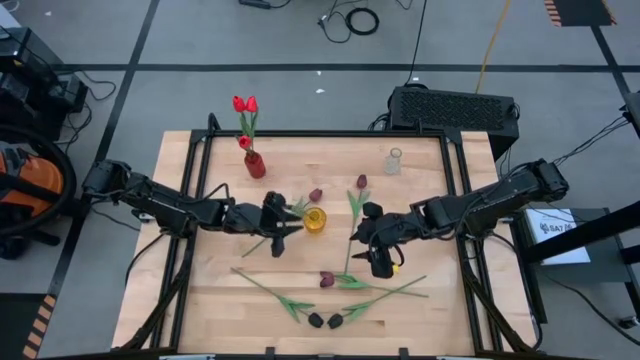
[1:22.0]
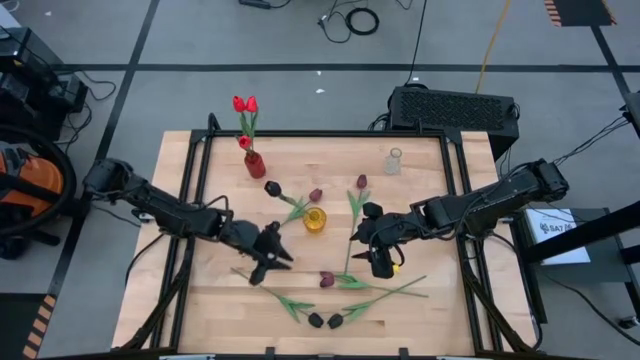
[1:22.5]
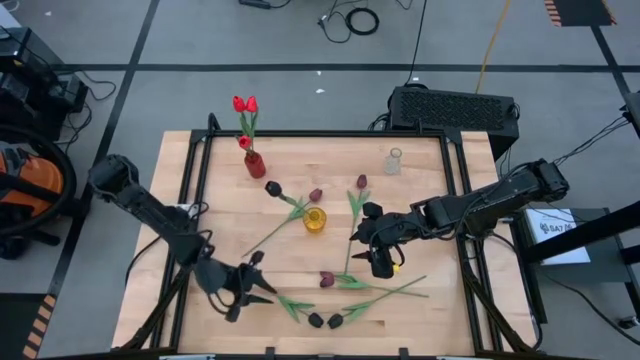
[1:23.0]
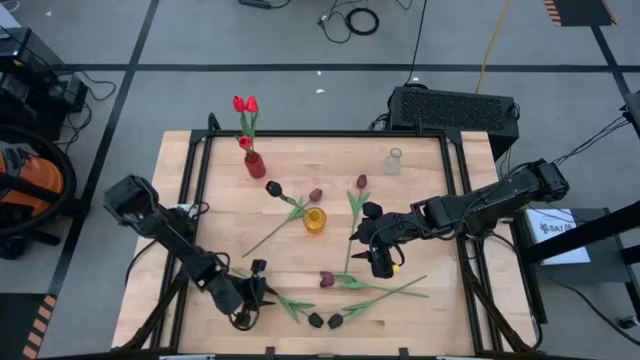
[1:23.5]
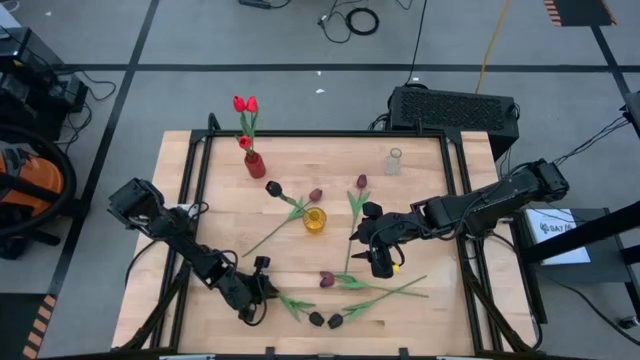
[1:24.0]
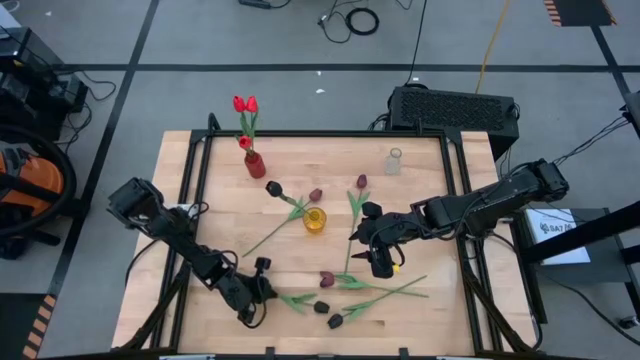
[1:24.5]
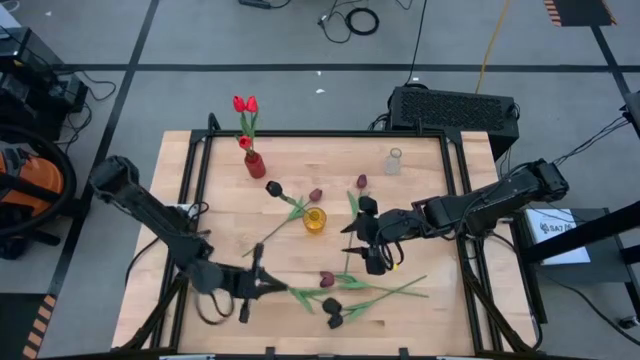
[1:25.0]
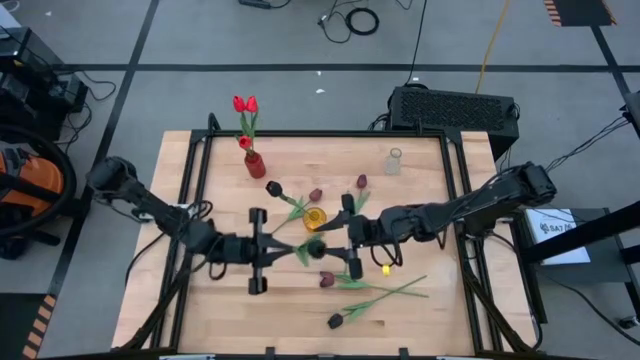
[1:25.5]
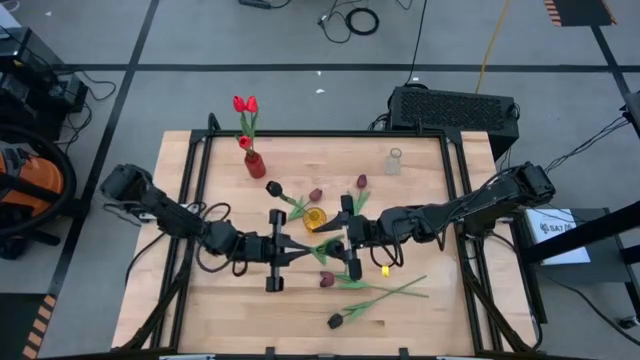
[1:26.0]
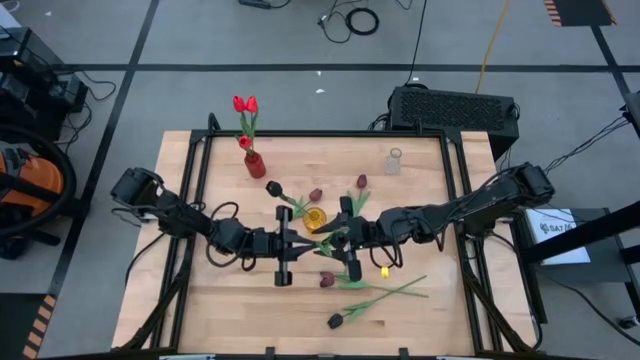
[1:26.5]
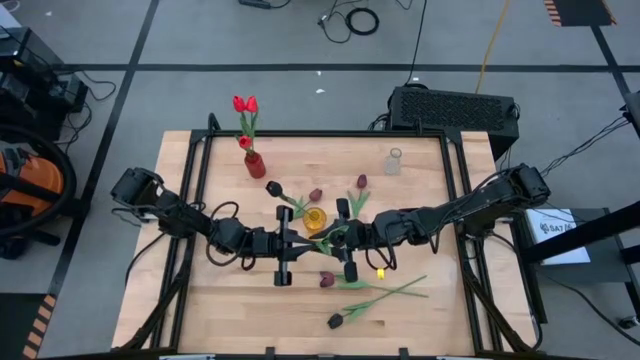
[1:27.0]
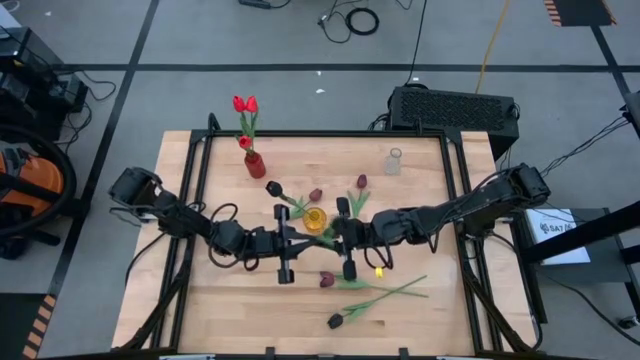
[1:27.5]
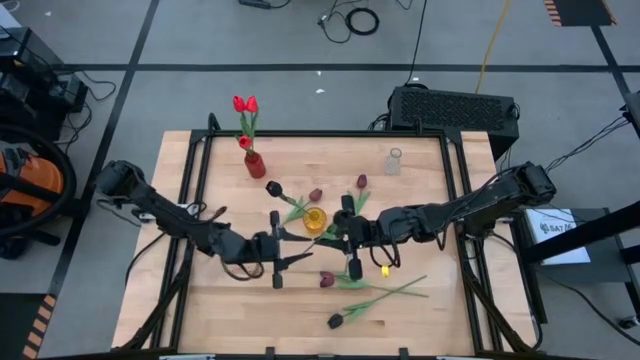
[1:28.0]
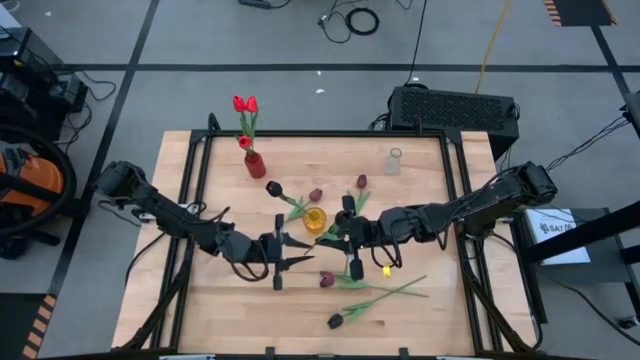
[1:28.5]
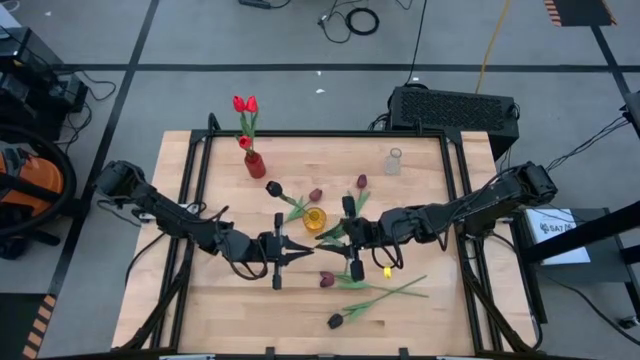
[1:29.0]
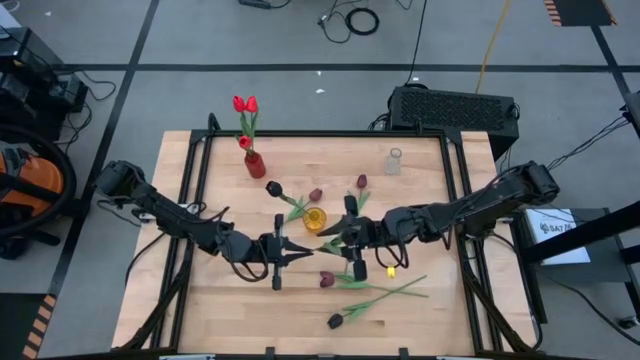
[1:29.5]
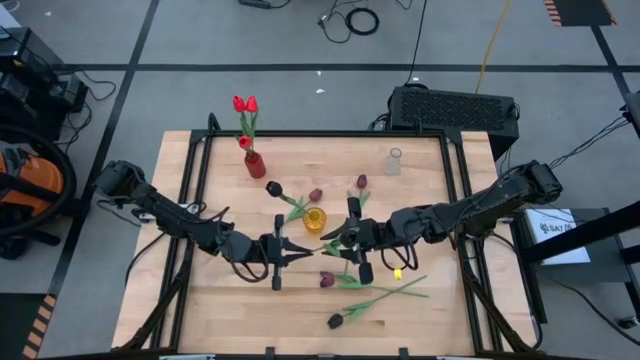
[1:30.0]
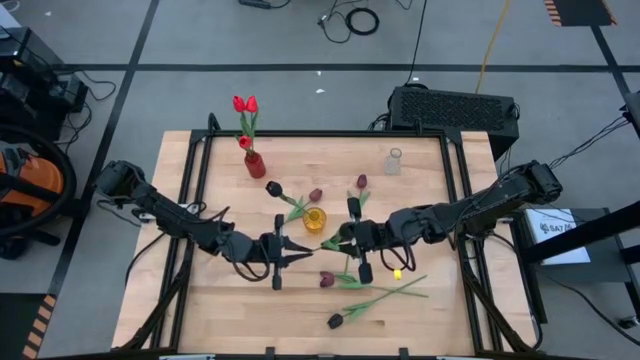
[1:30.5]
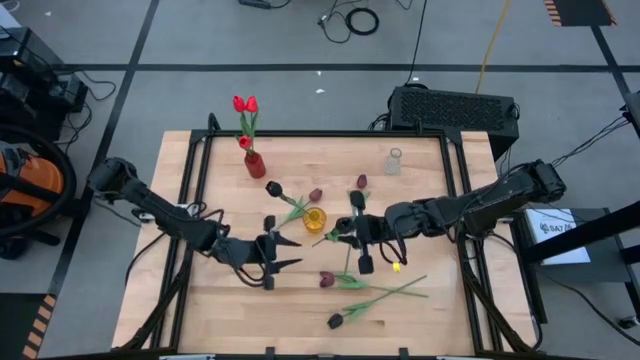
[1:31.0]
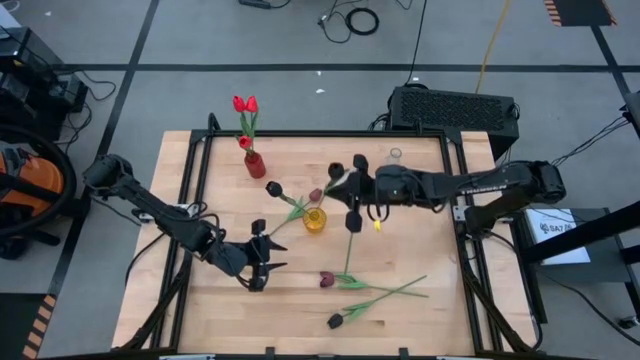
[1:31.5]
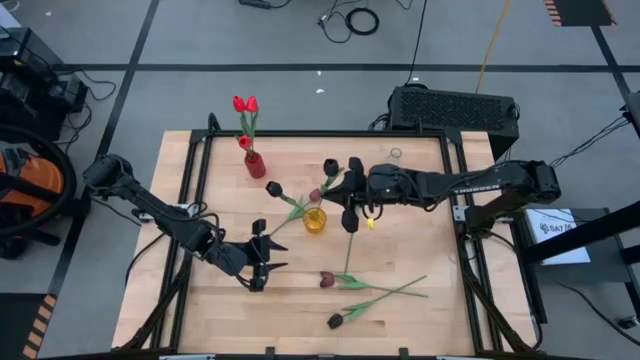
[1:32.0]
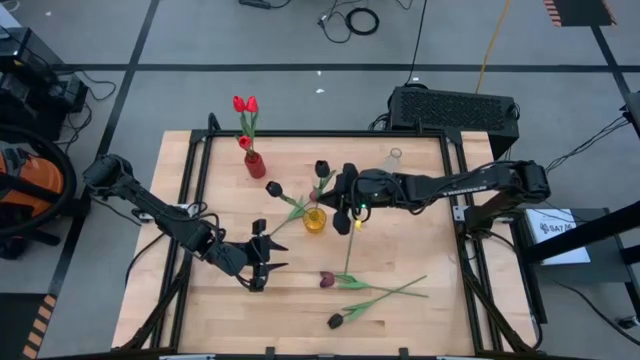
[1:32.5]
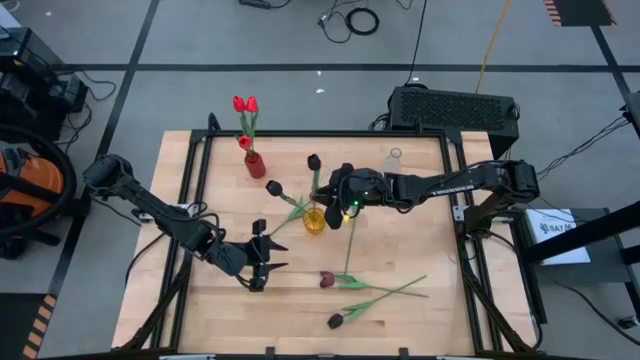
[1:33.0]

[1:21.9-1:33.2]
Task: Sort flowers into vase by color
Put the left black flower into the yellow vase

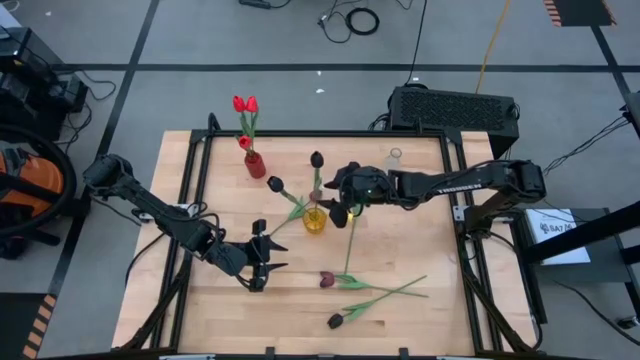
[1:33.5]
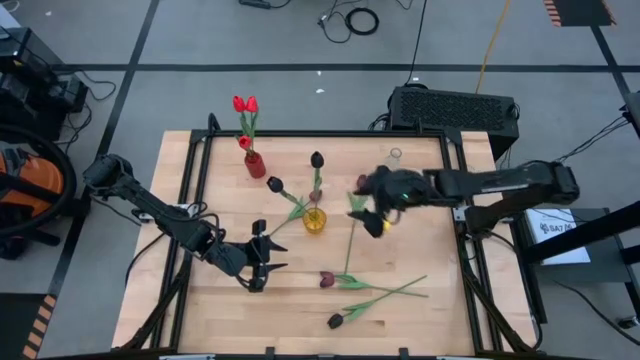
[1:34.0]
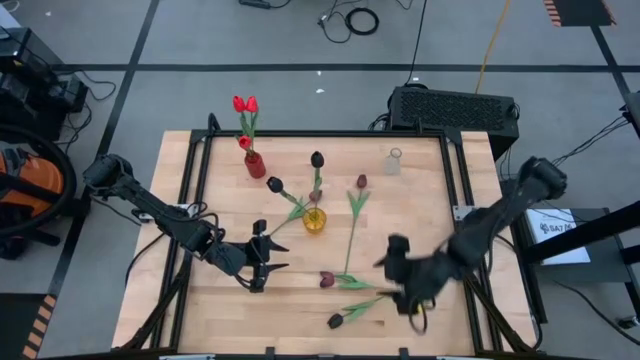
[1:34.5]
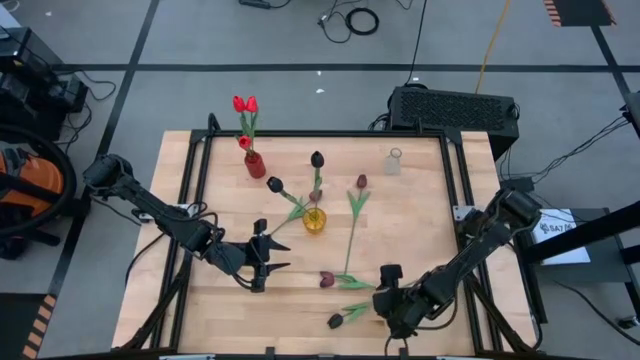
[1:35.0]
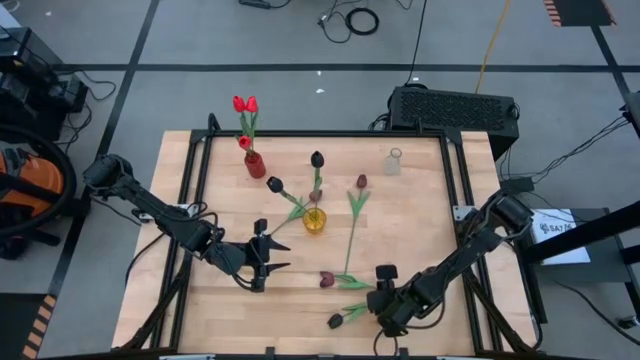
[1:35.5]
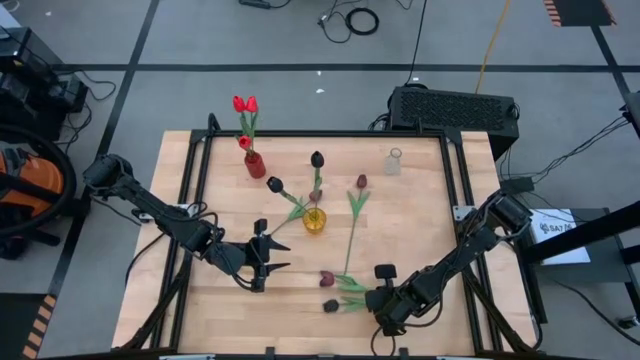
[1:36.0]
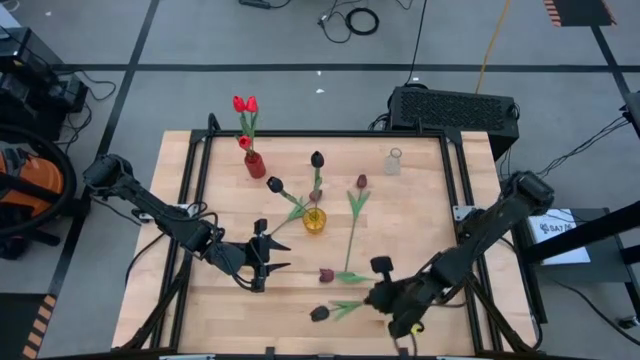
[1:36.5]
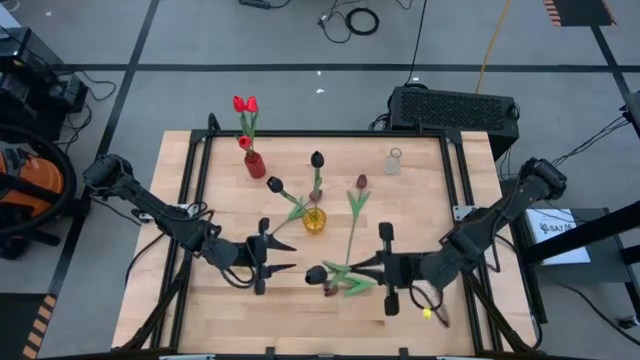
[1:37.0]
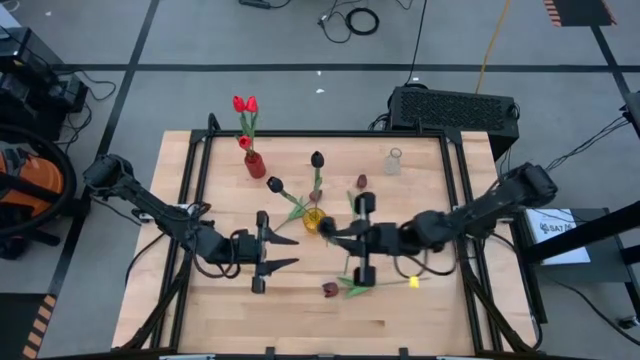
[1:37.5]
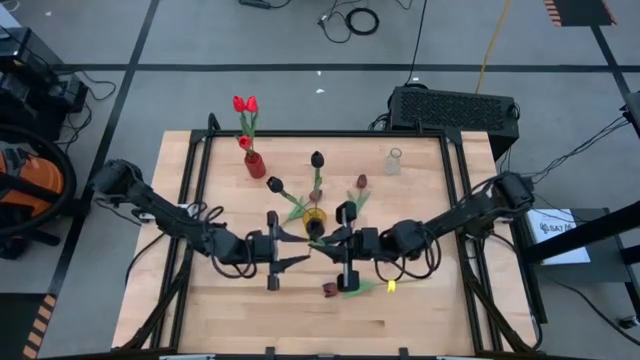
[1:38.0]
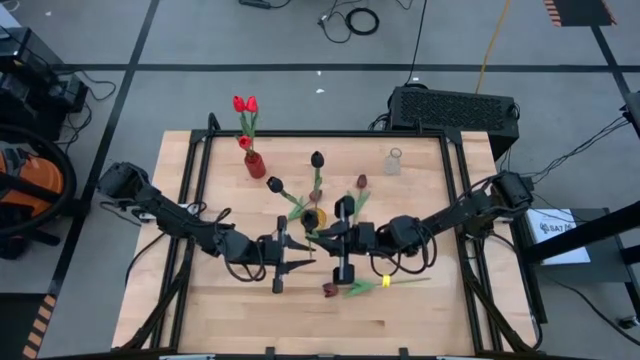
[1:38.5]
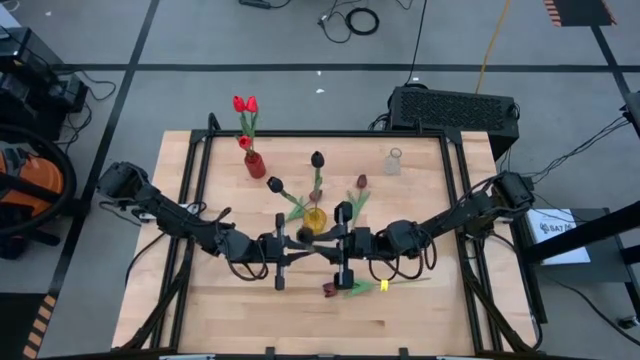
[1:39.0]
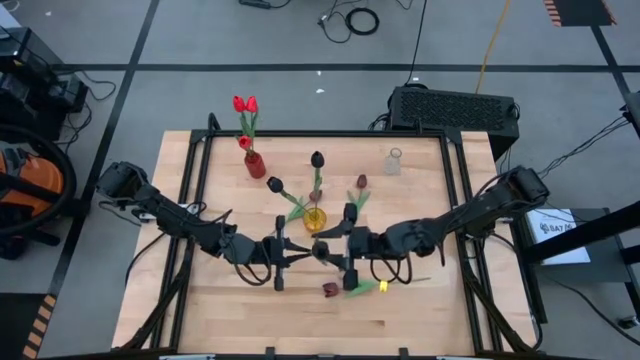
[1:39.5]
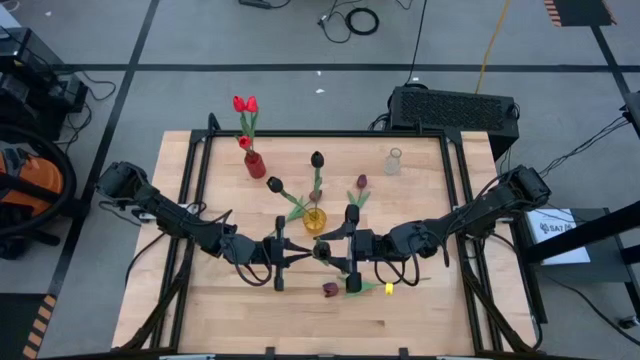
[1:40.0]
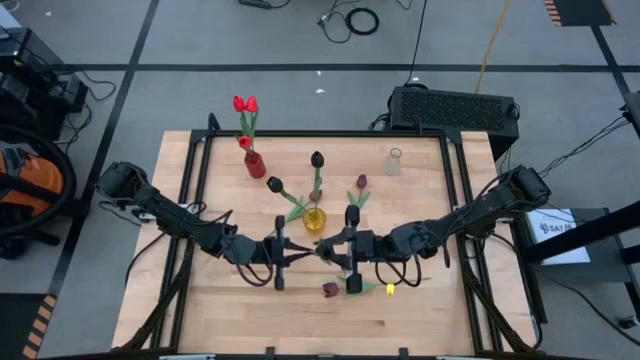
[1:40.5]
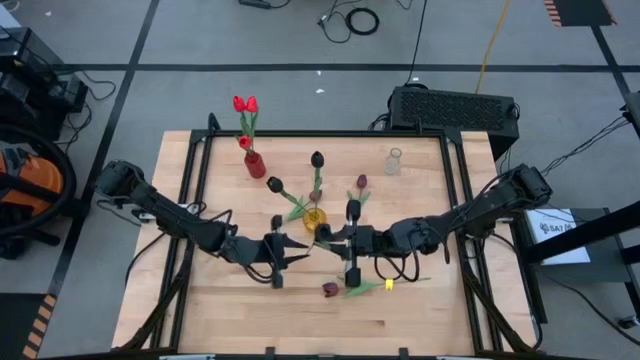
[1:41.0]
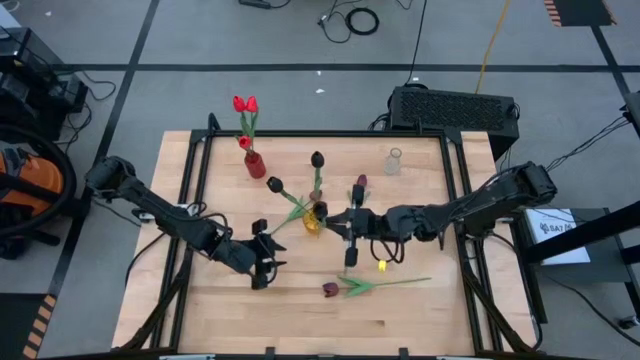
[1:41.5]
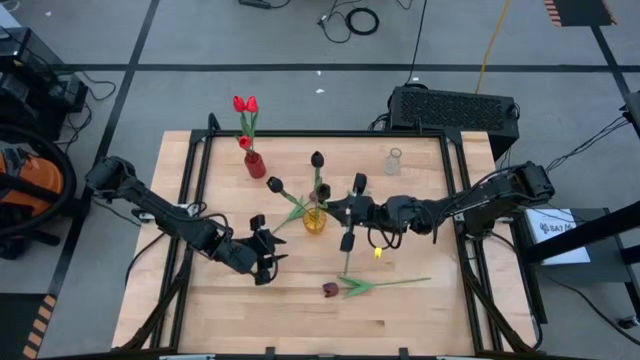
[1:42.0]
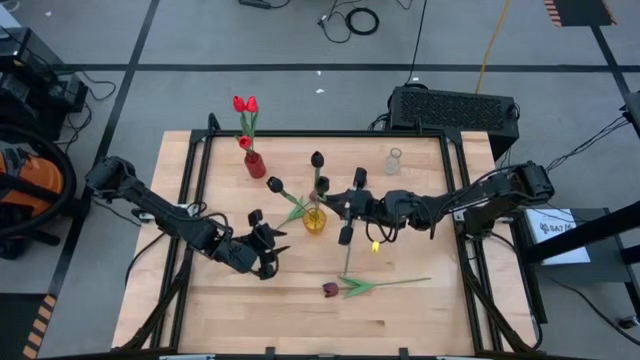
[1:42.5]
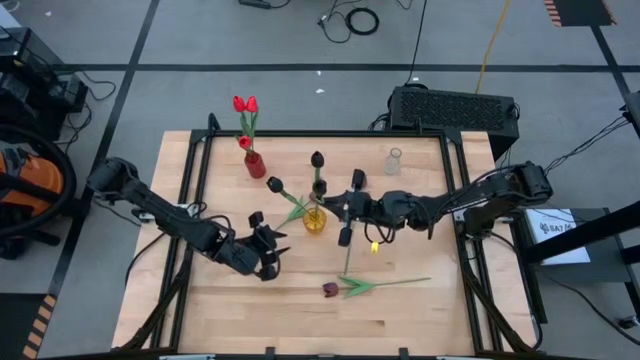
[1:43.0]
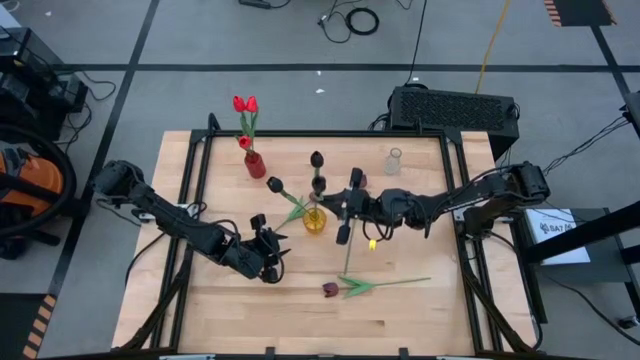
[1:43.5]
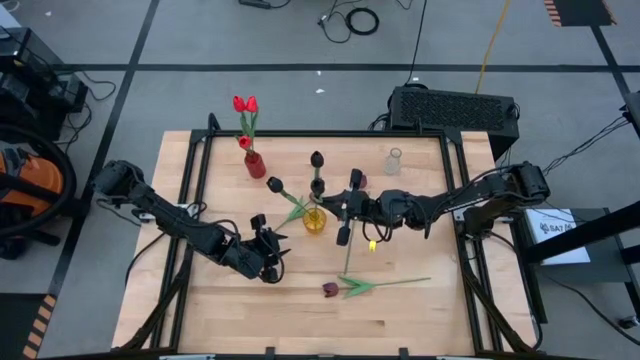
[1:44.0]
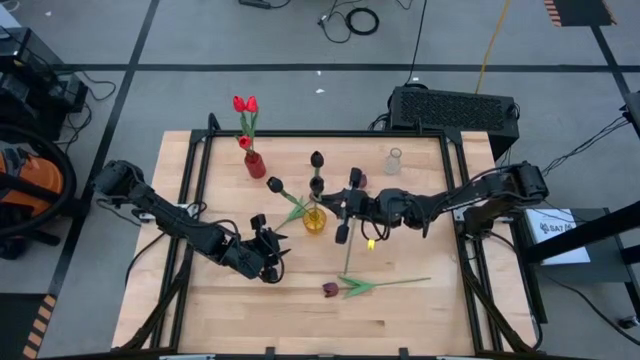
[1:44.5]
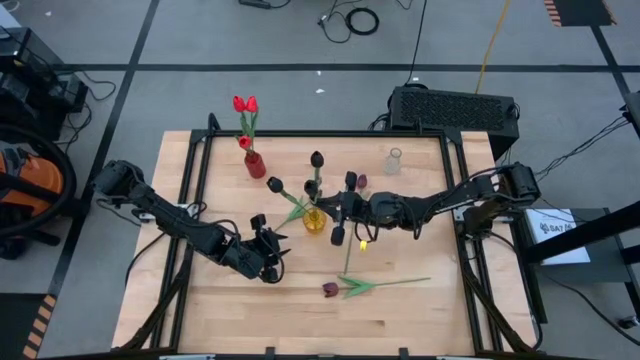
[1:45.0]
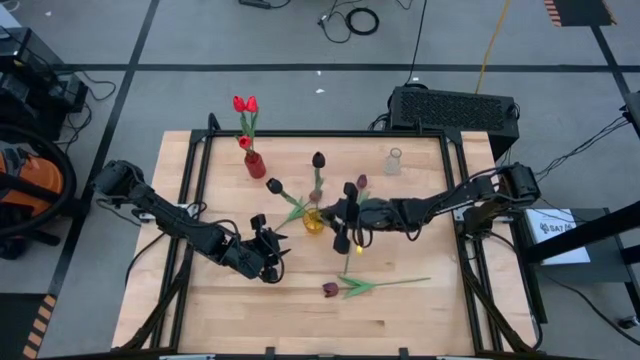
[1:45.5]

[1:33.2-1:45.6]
Put the black flower into the yellow vase
